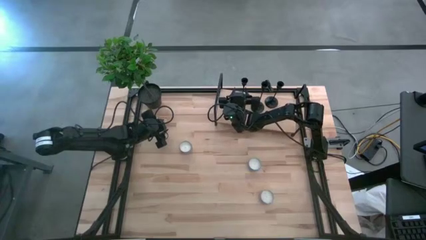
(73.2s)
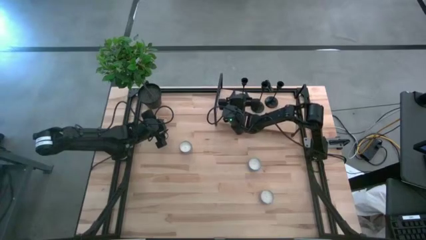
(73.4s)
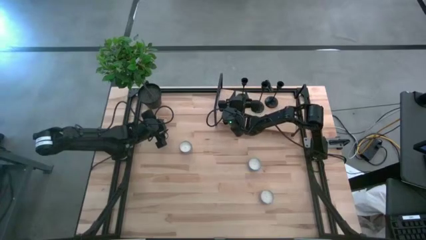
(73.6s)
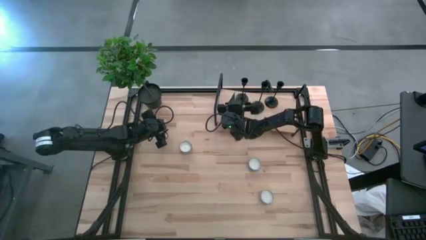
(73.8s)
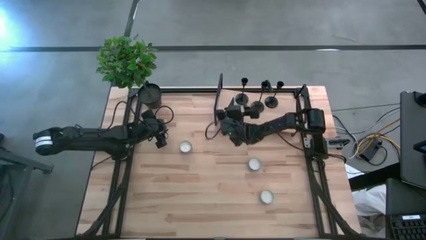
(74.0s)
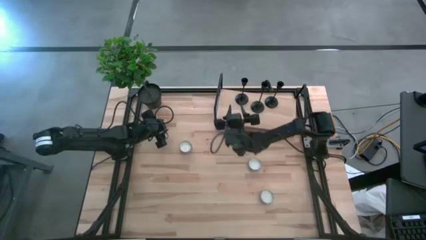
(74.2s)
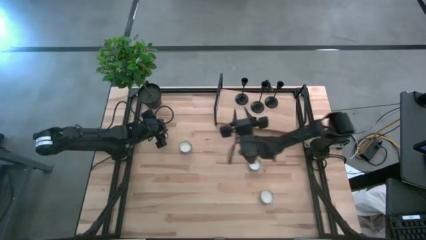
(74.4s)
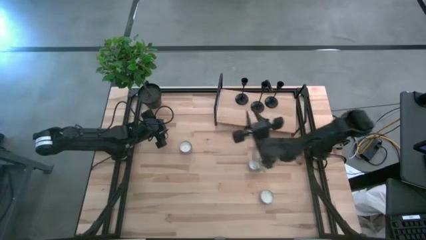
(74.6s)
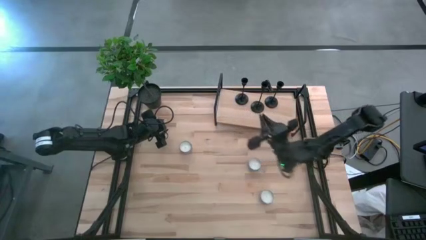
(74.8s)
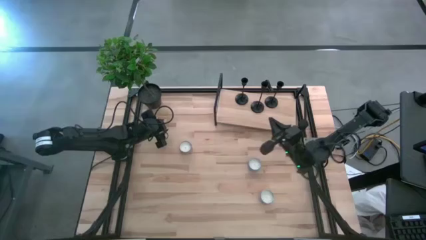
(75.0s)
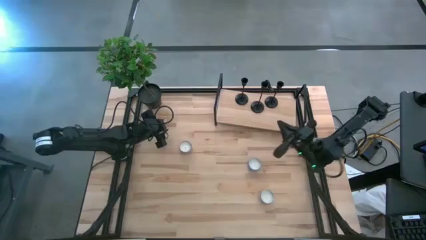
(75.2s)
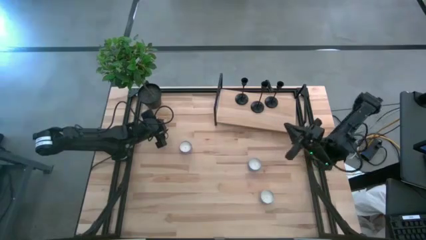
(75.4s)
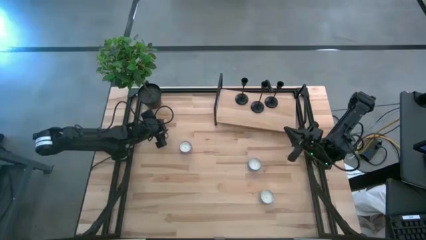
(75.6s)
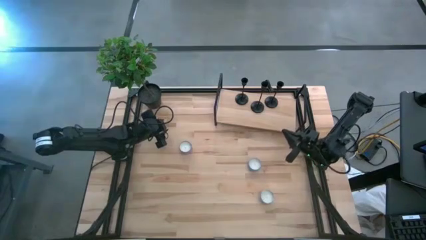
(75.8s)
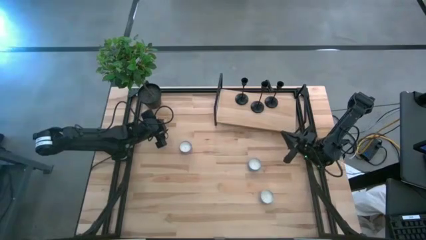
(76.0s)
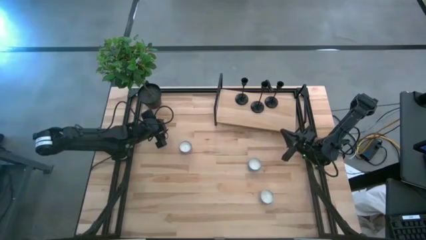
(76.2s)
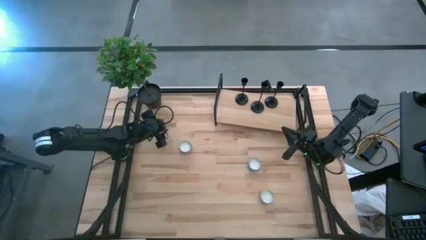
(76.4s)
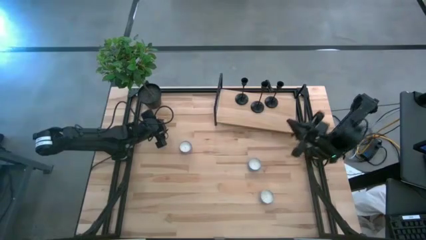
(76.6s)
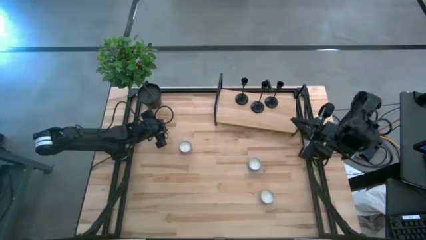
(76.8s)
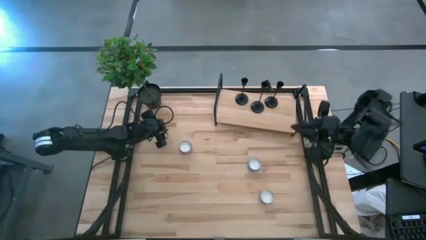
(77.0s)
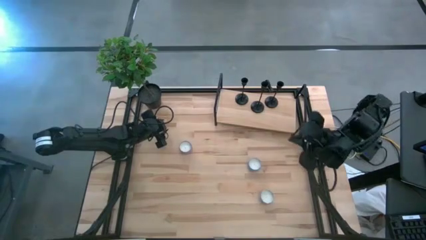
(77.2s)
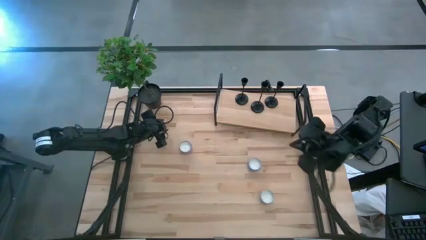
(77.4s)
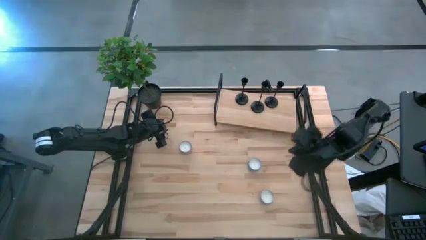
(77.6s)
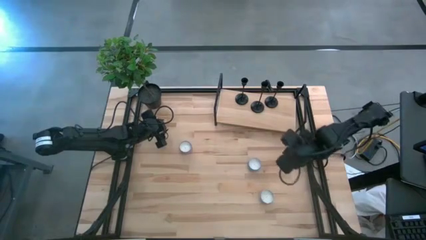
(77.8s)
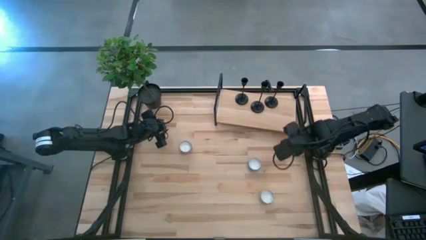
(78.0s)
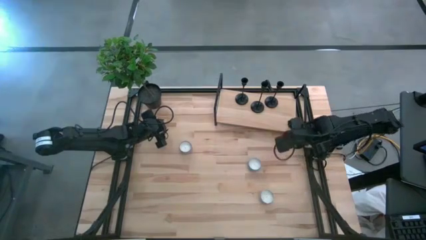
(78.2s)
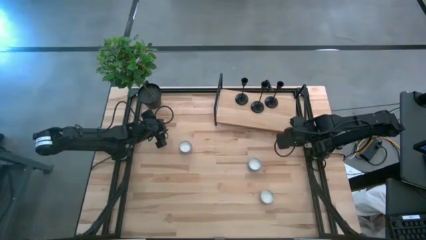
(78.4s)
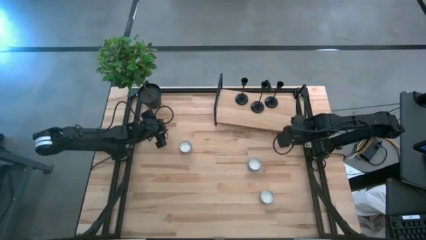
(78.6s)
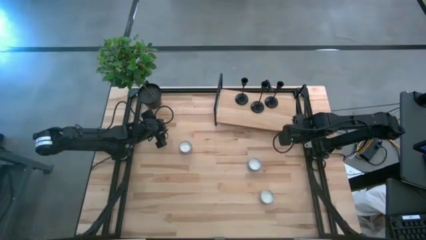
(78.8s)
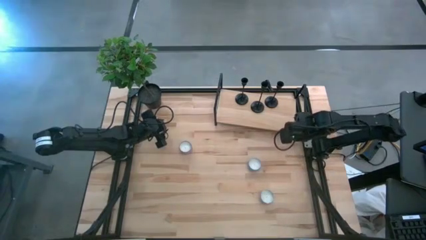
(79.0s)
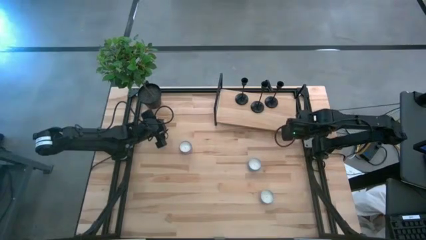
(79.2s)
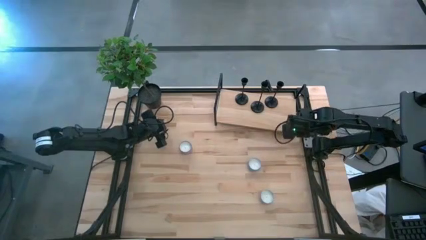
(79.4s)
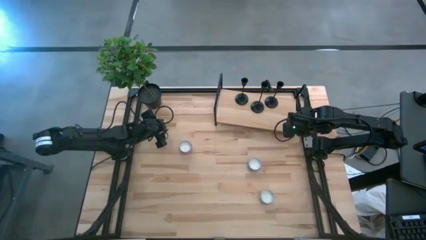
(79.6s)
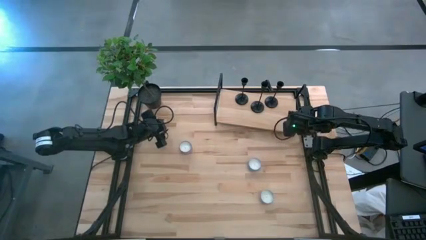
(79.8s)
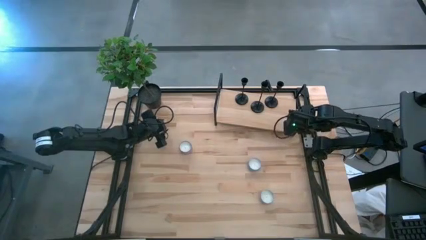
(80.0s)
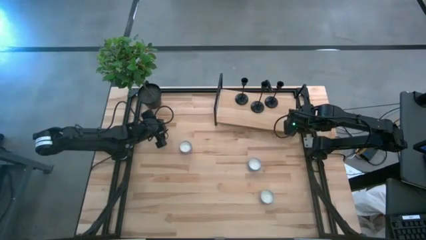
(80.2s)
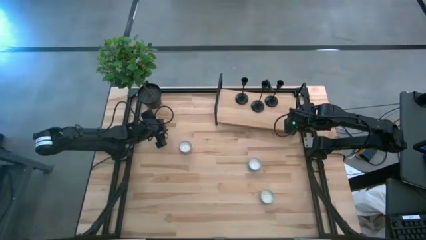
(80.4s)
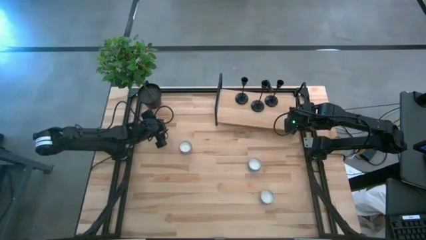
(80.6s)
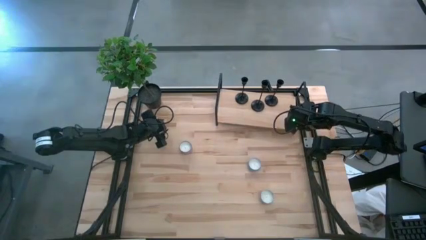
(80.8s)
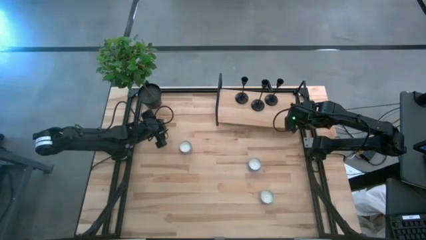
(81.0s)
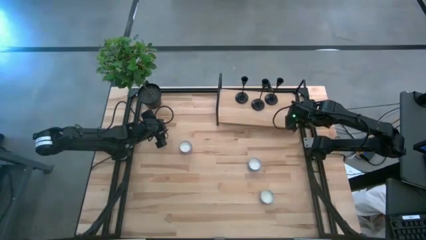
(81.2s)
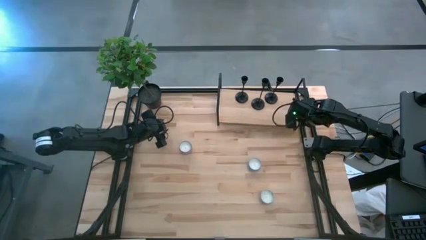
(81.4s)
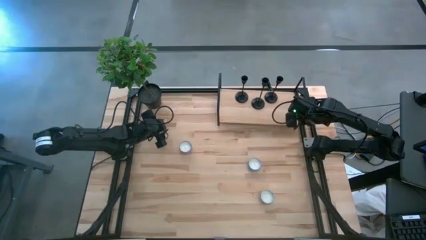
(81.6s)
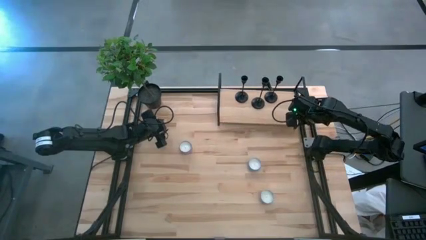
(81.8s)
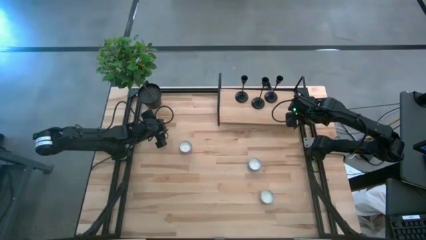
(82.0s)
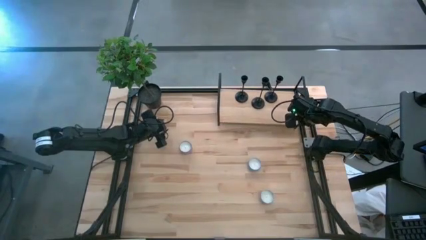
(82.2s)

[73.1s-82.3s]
Task: Pick & Place candle stick holders
Adjust the shelf

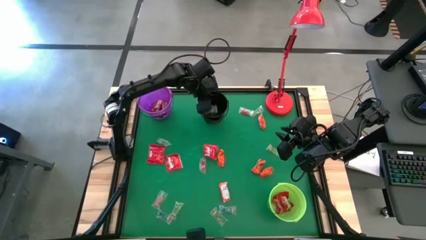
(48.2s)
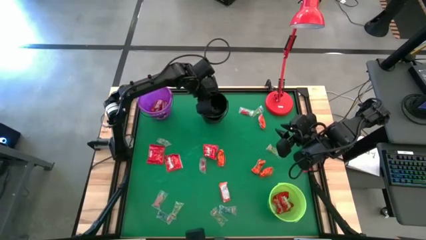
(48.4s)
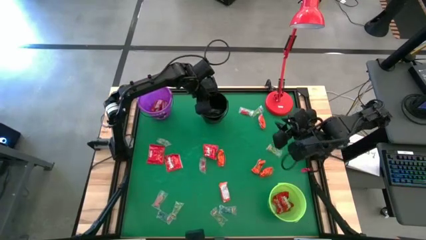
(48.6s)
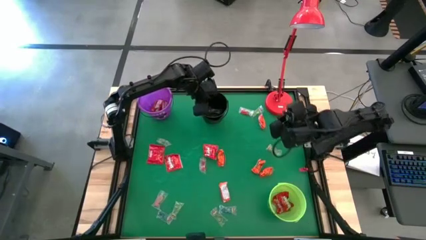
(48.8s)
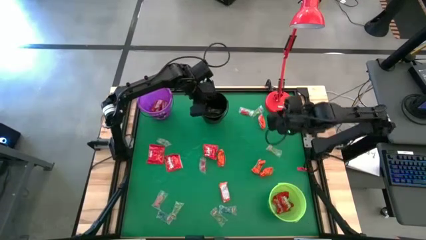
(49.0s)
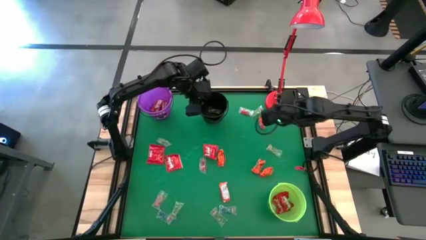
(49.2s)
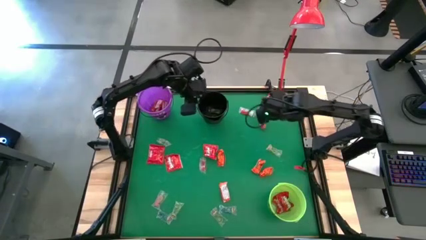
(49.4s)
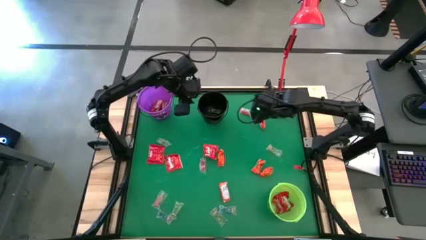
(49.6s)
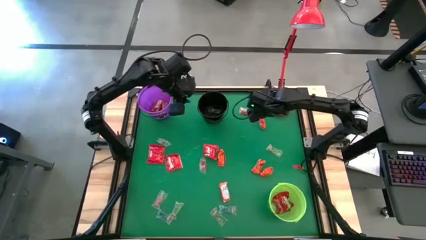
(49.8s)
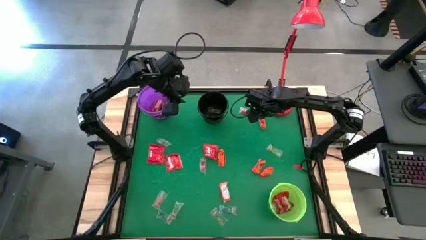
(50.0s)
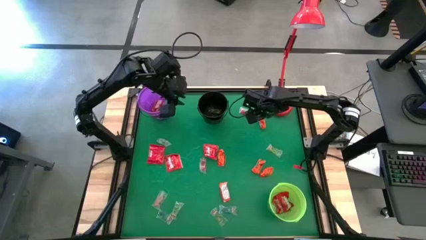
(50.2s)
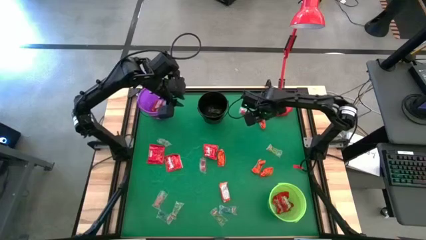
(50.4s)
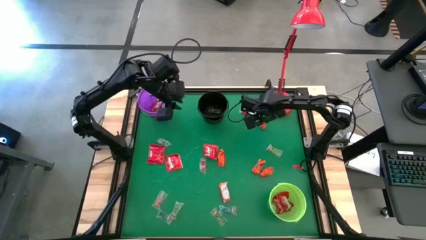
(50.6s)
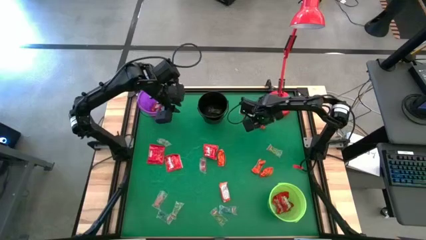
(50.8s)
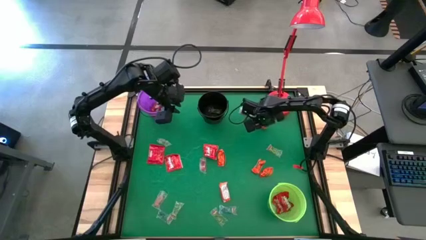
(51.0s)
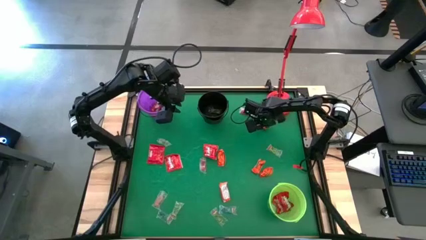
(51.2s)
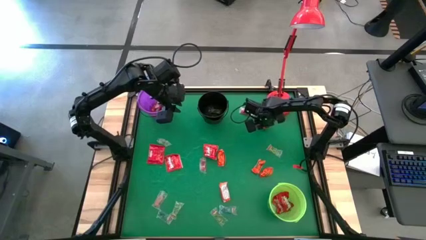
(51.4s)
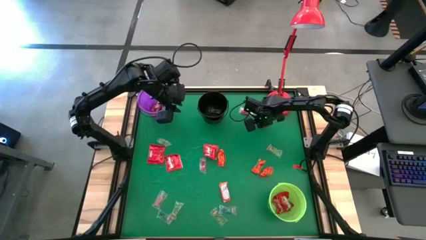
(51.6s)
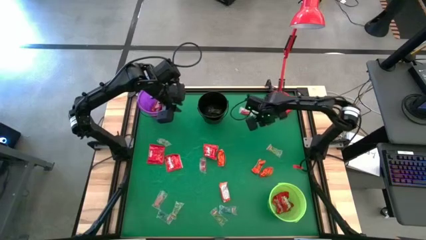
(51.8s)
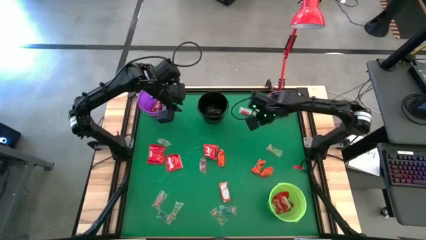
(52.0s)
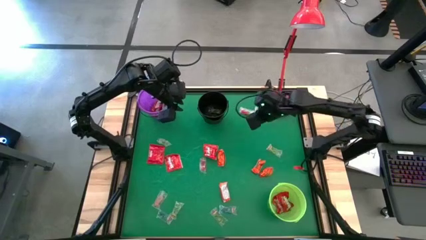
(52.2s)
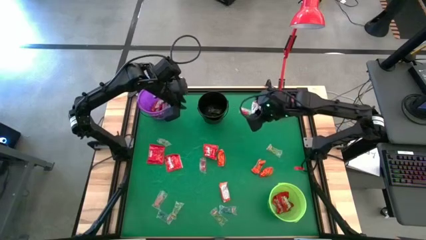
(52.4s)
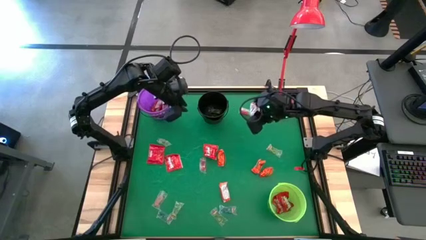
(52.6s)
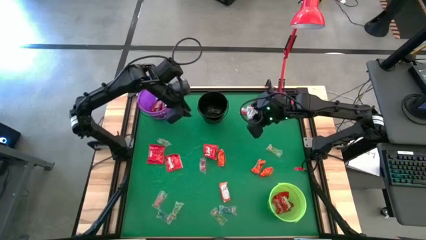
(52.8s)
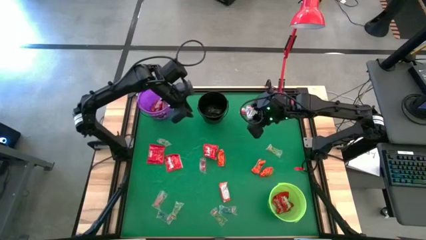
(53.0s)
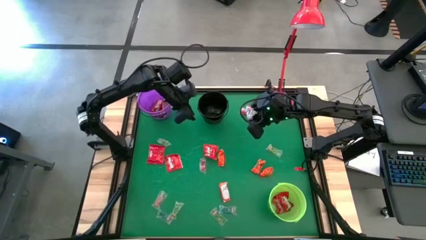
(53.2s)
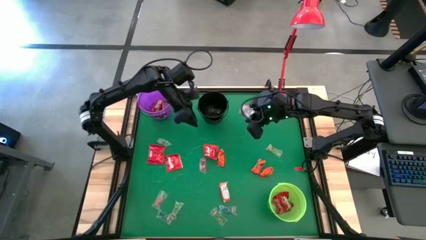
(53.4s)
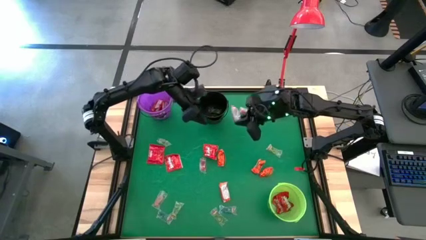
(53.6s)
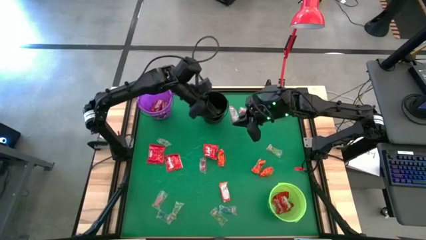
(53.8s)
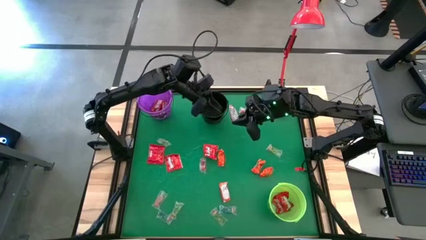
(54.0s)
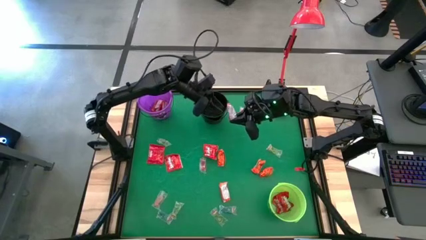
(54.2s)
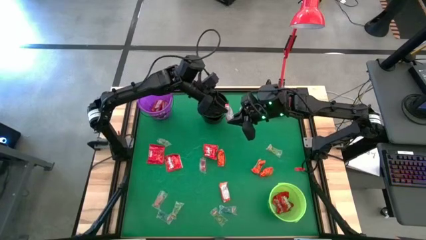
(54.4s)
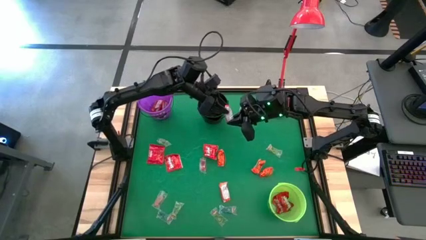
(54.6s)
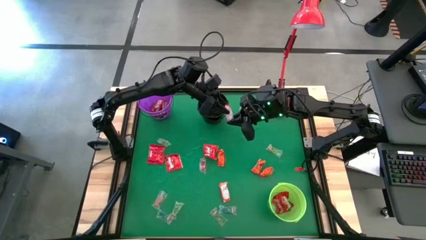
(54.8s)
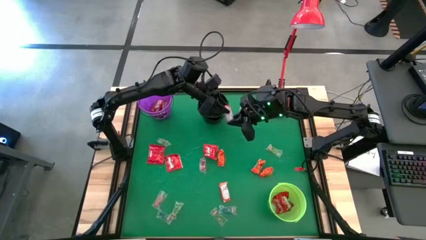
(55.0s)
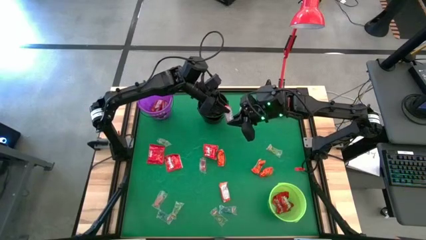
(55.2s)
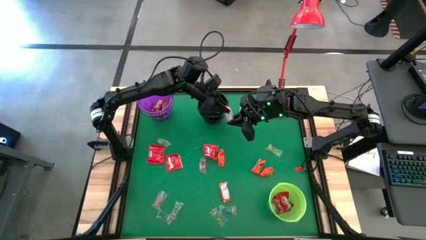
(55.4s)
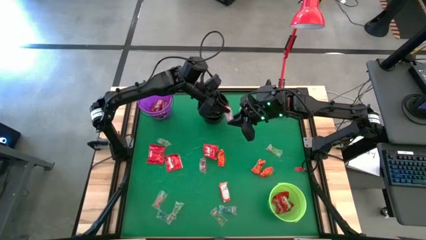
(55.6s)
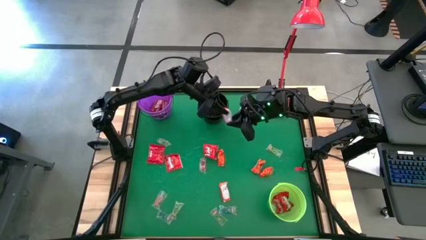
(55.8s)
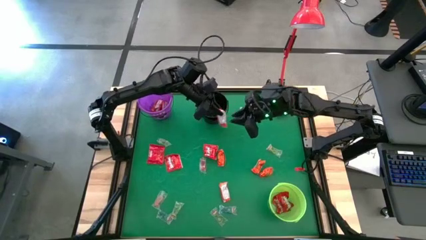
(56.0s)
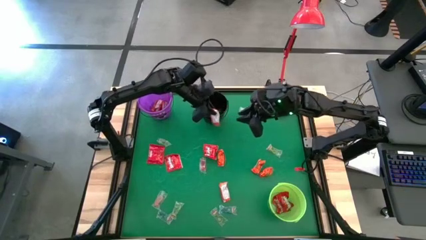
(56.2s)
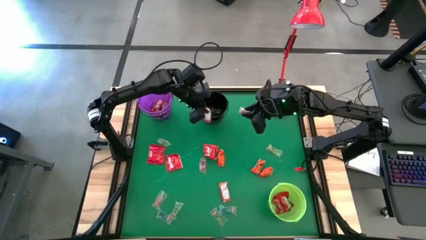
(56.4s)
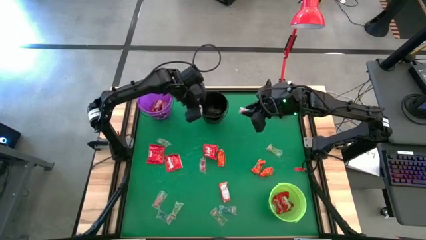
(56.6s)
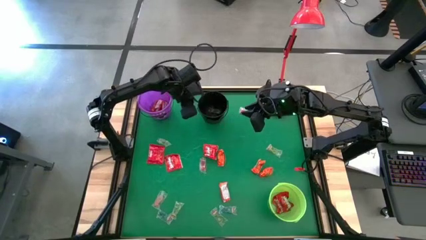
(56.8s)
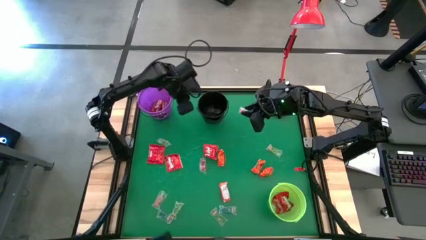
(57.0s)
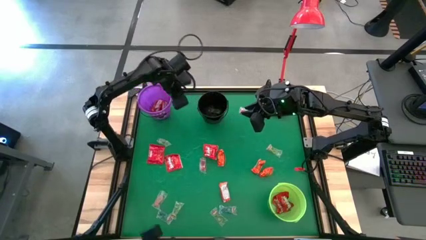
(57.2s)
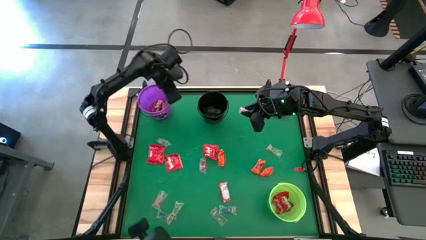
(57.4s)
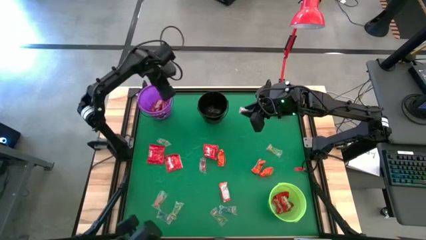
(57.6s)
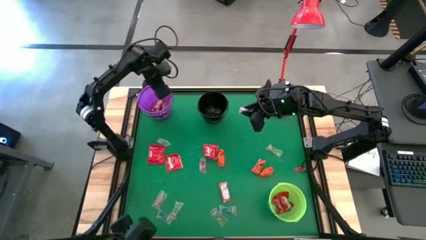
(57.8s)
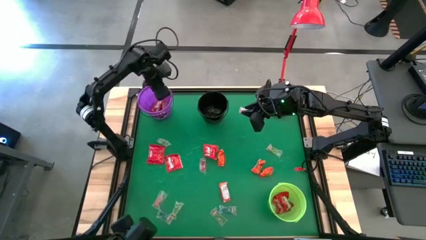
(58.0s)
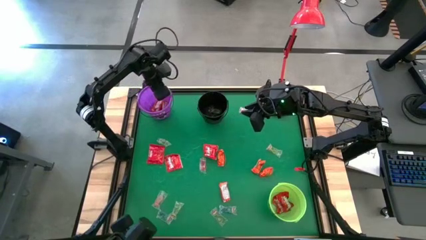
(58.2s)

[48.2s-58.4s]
Task: Sort candy
Put the orange chocolate bar into the purple bucket
